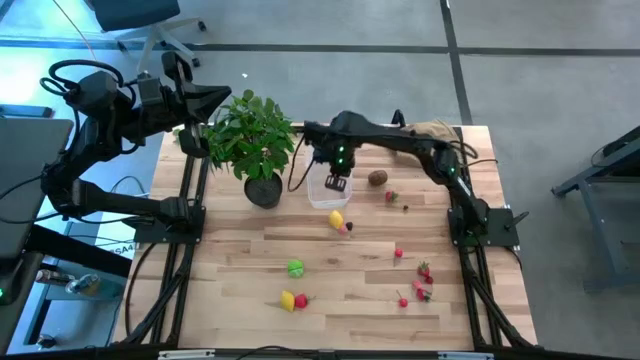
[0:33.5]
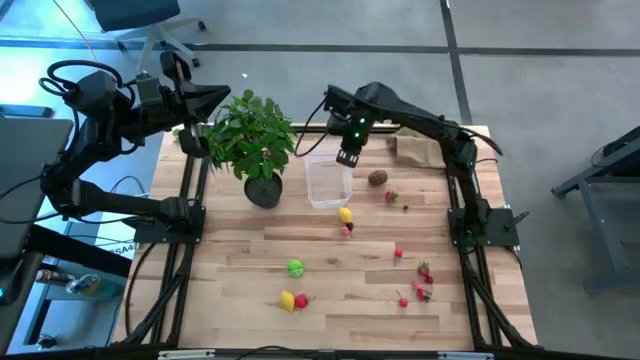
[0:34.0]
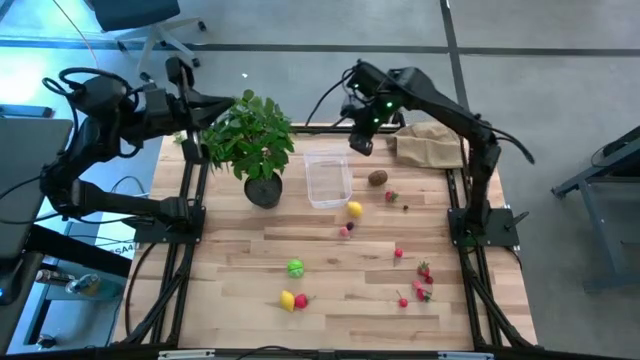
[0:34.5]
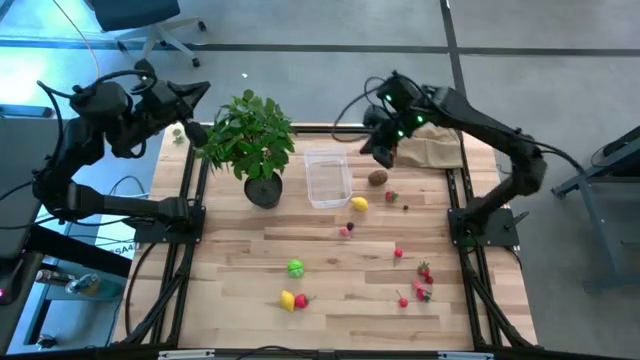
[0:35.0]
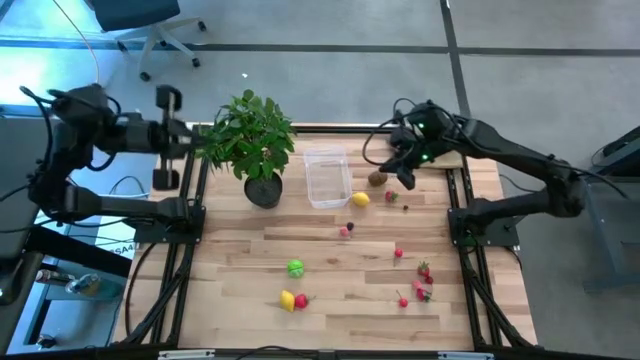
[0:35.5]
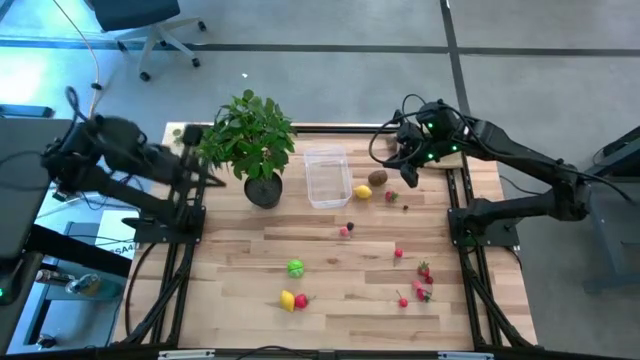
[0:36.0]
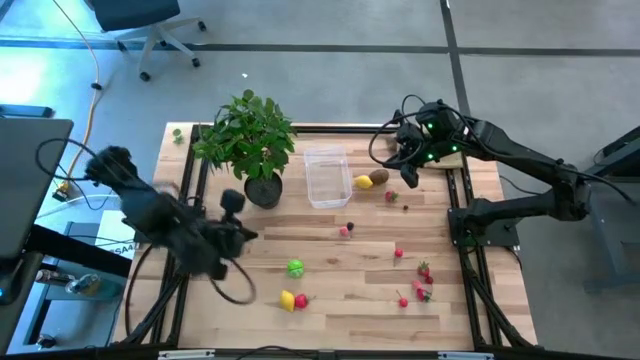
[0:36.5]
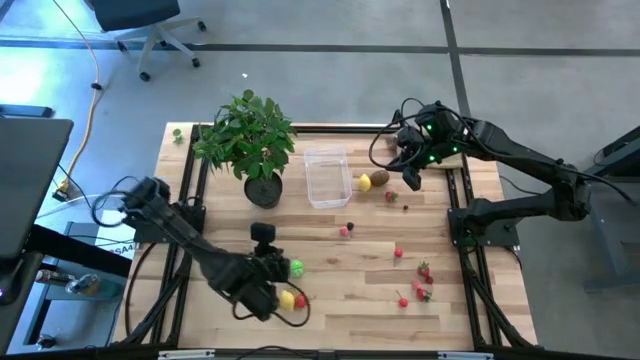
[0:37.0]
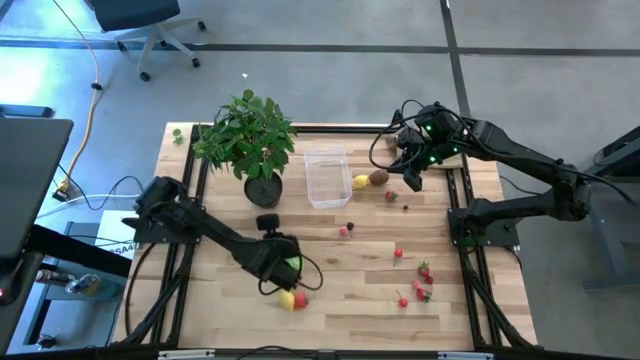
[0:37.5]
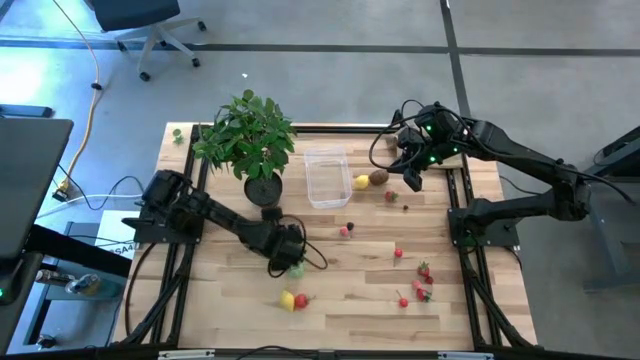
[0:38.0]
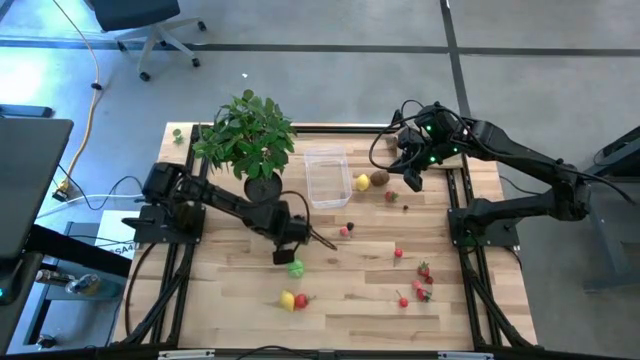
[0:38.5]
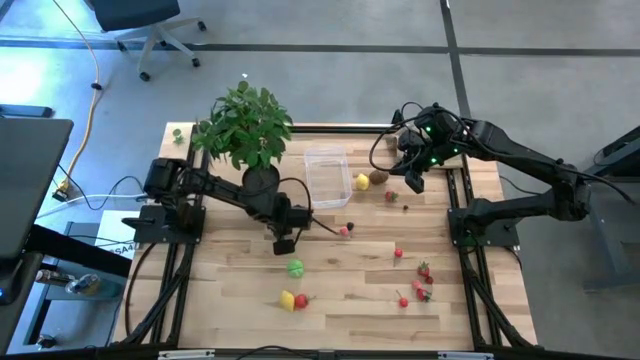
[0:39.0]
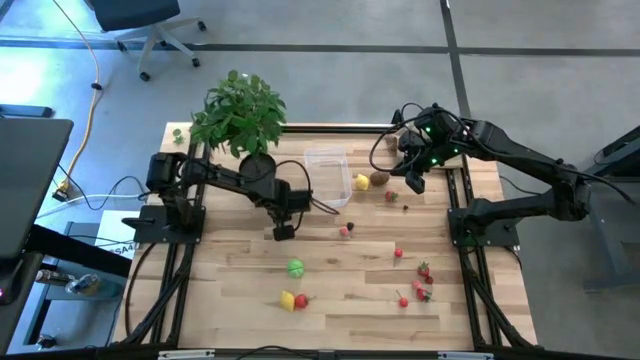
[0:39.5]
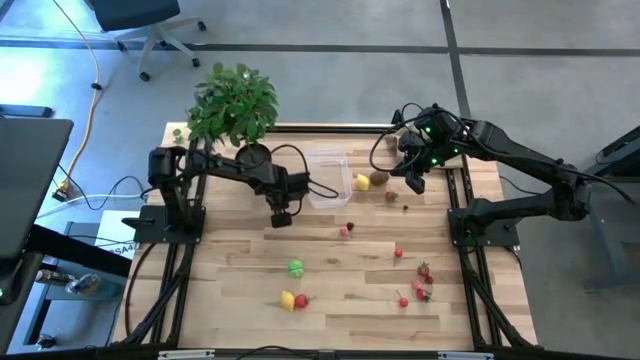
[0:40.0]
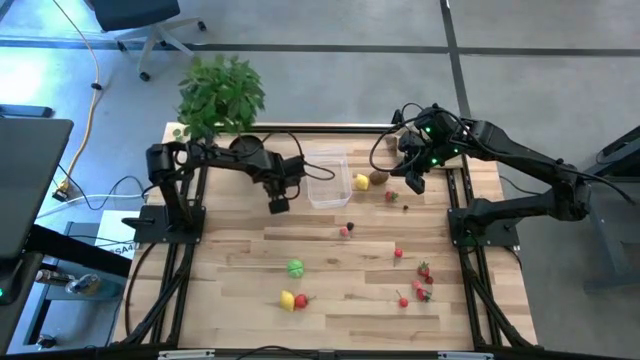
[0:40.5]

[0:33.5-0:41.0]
Task: Pick and placing Produce into tupperware
Move the potted plant to the top left of the table

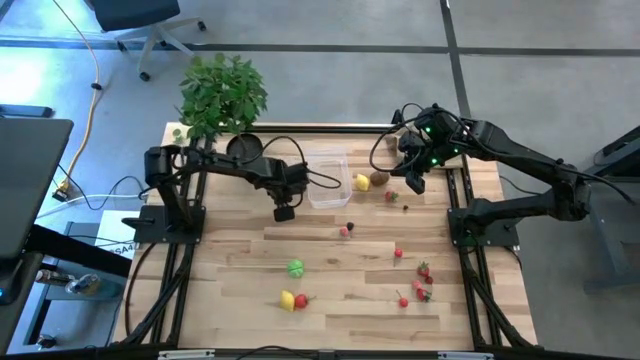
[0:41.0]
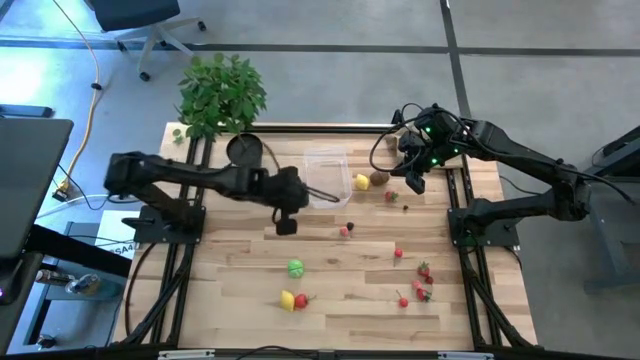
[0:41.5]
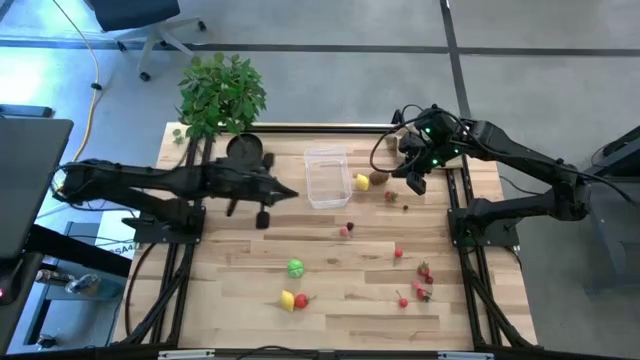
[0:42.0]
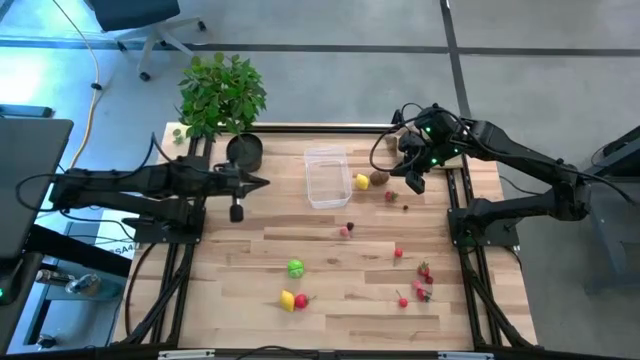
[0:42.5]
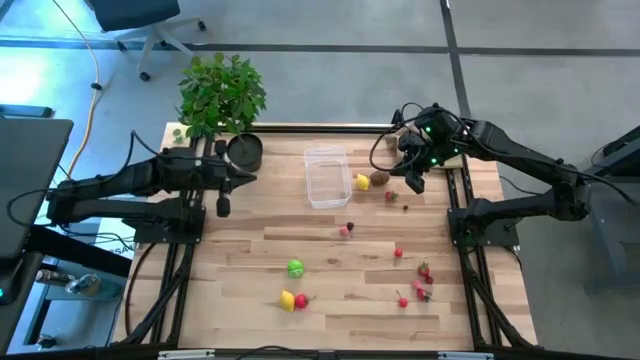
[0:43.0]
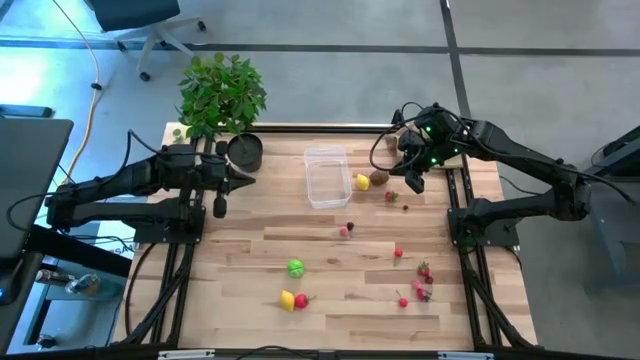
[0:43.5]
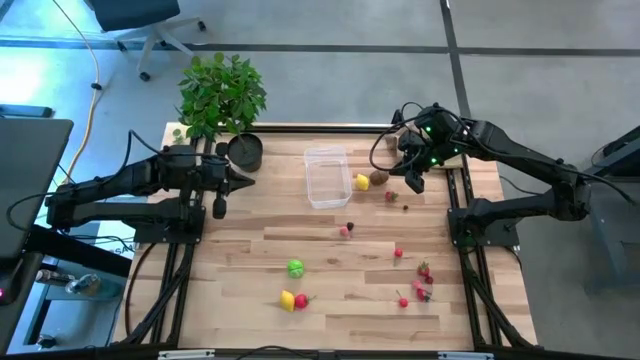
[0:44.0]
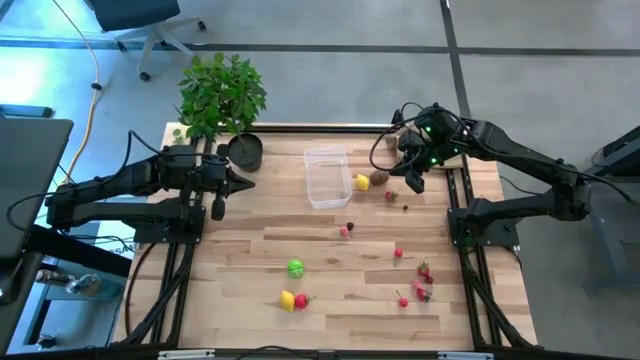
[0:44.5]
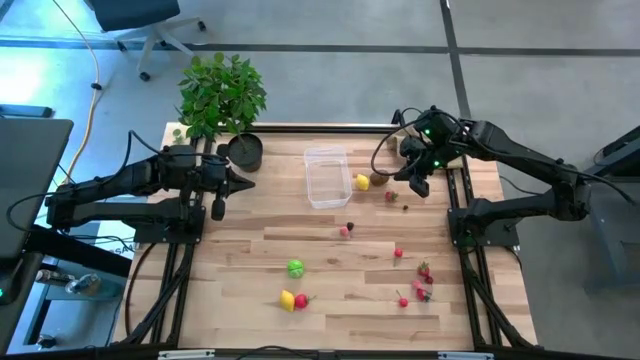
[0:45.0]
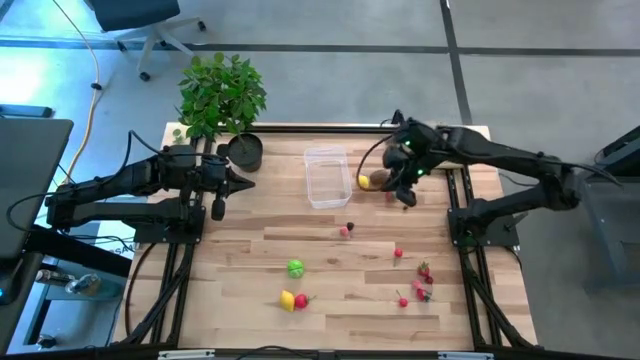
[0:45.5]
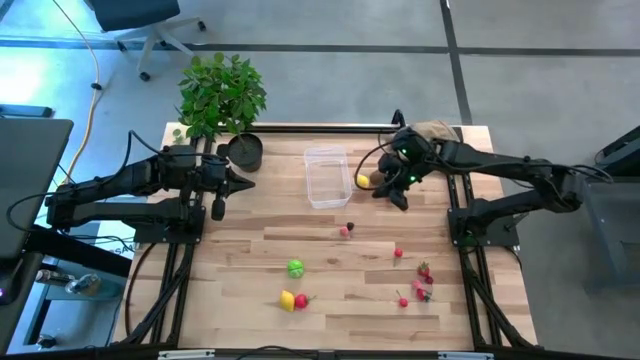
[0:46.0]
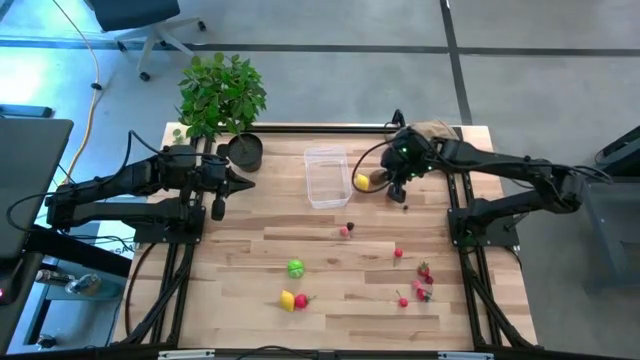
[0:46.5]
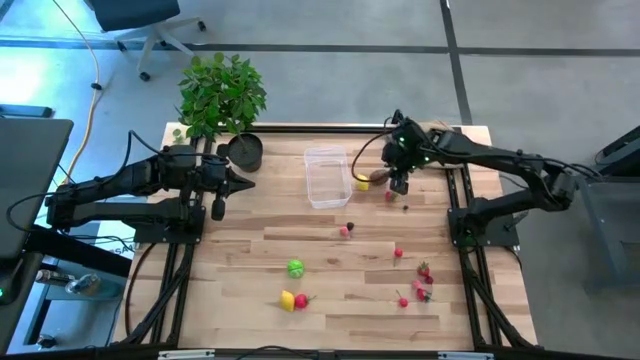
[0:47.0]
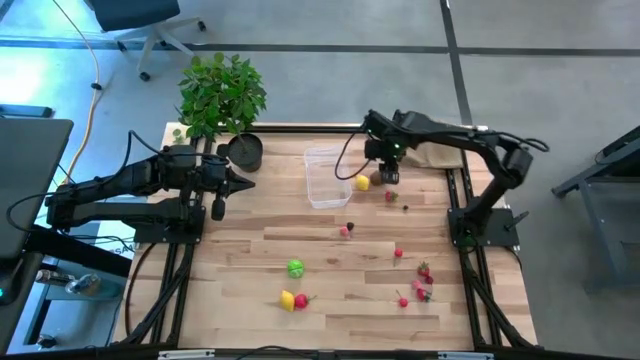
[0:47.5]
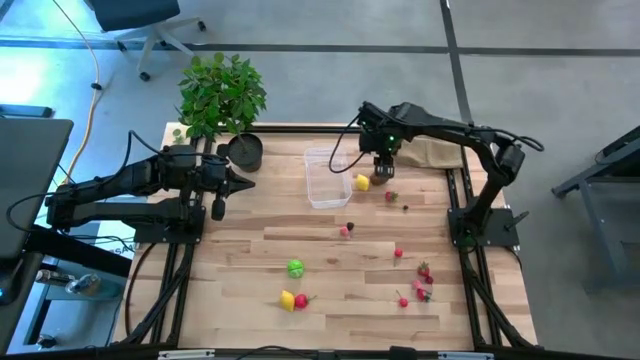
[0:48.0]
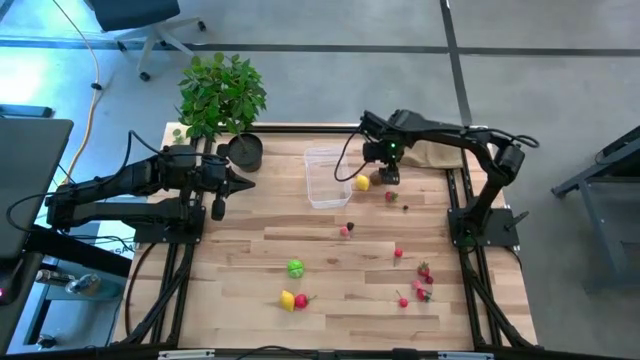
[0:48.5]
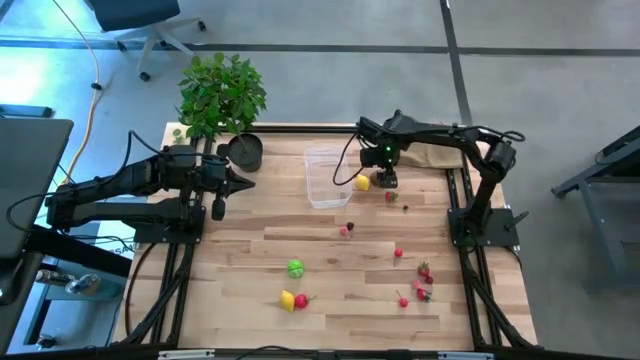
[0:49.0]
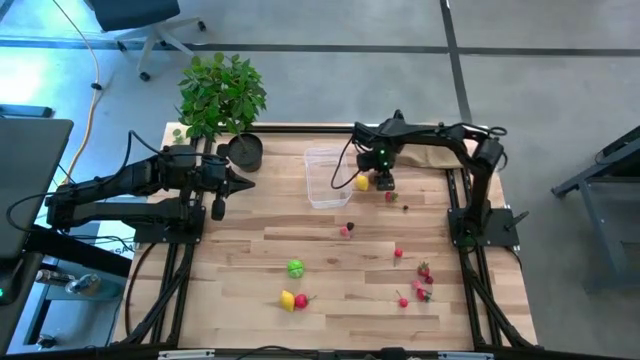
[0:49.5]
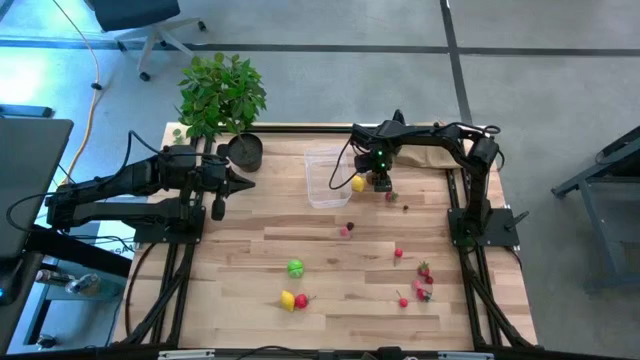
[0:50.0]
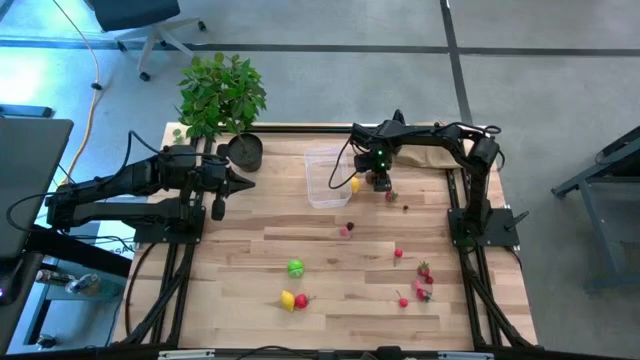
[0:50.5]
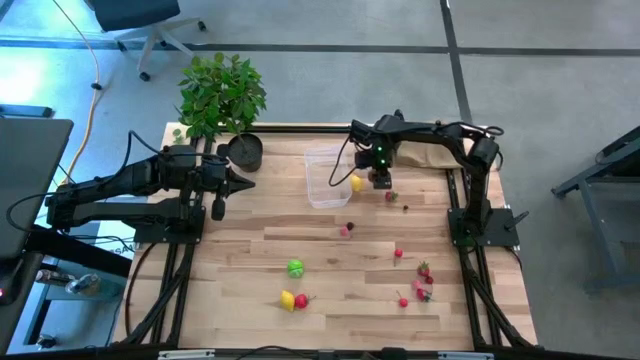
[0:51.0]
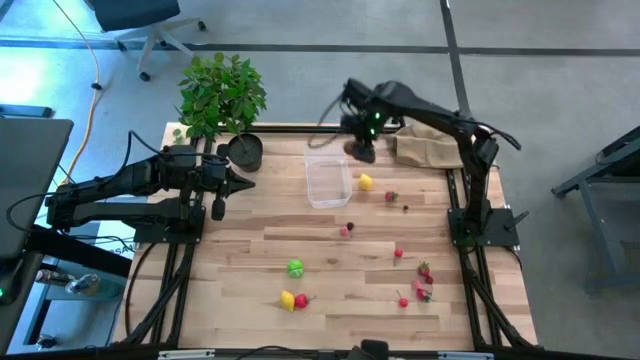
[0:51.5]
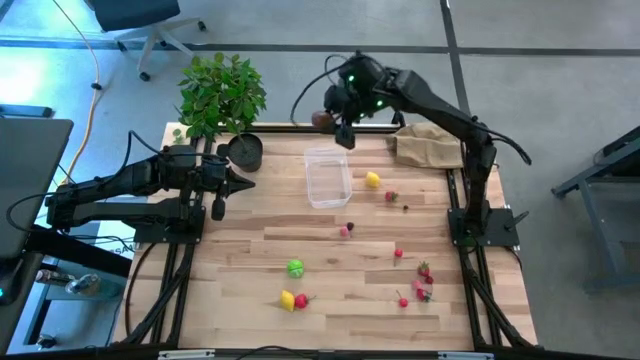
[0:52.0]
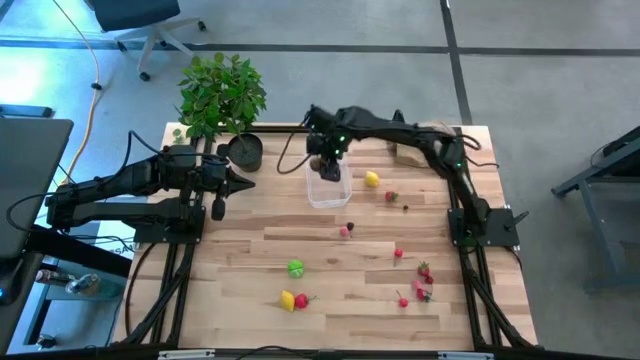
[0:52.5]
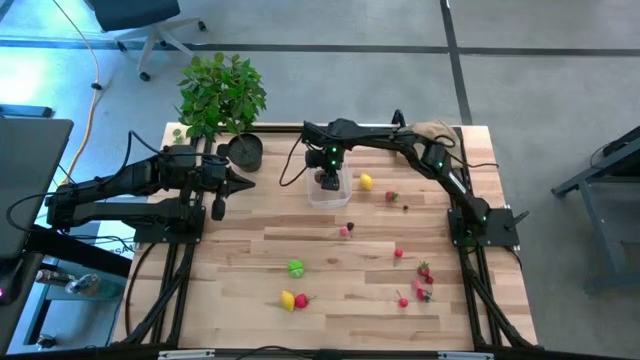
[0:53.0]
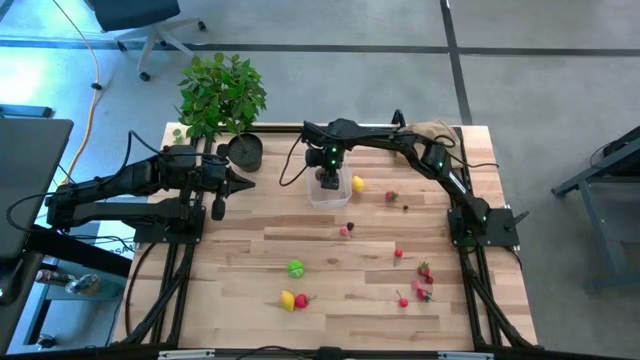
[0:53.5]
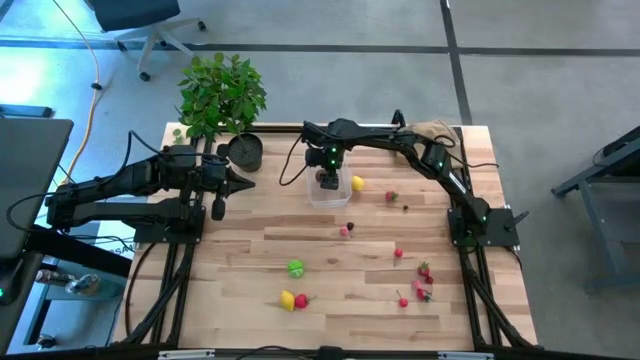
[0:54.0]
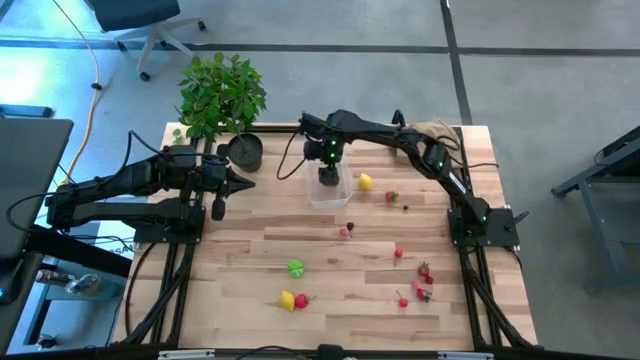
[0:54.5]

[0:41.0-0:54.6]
Put the kiwi into the transparent bin
